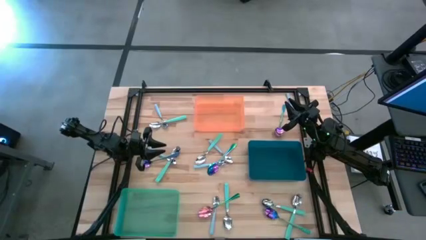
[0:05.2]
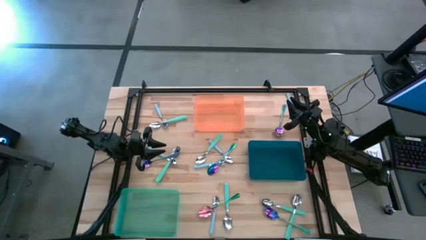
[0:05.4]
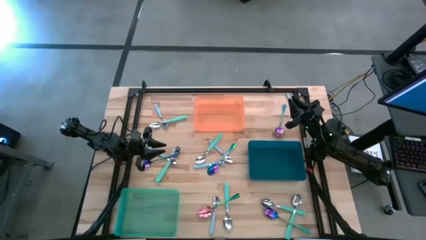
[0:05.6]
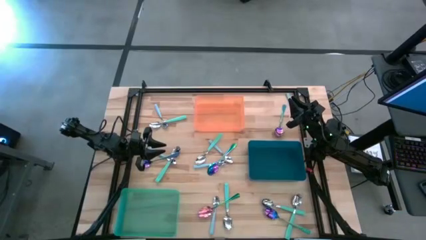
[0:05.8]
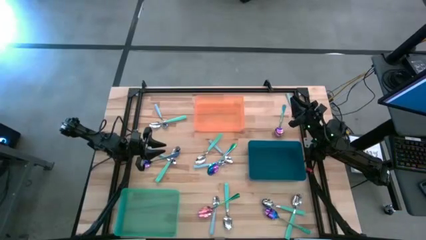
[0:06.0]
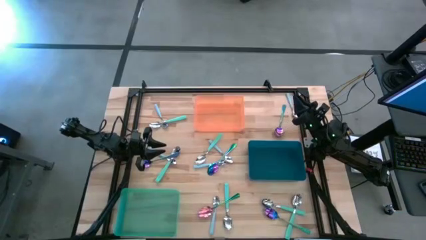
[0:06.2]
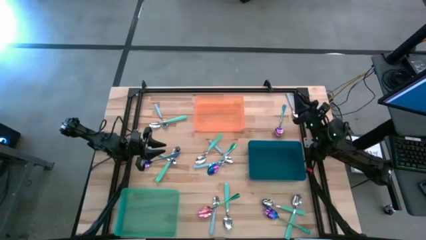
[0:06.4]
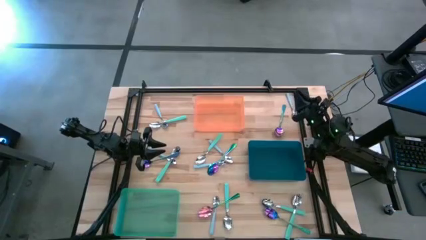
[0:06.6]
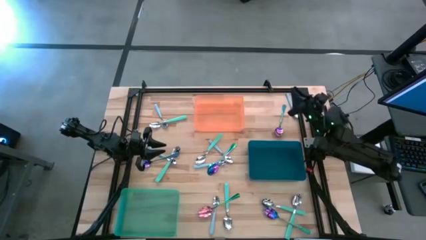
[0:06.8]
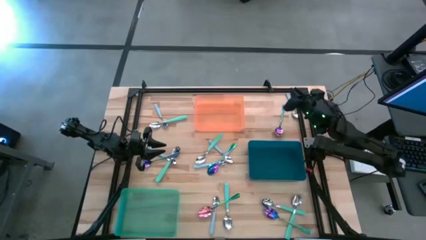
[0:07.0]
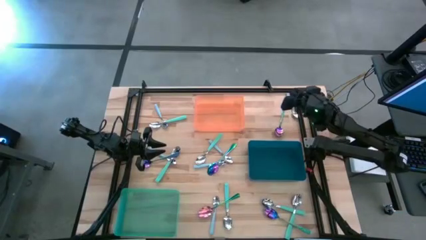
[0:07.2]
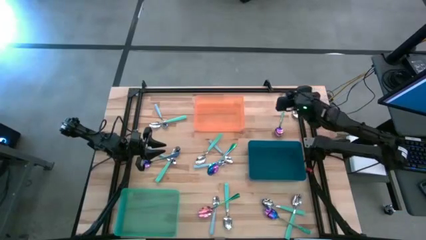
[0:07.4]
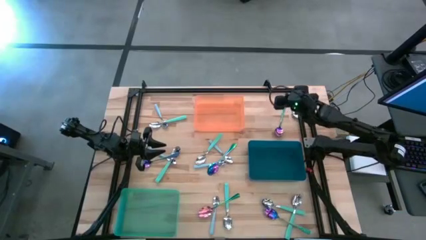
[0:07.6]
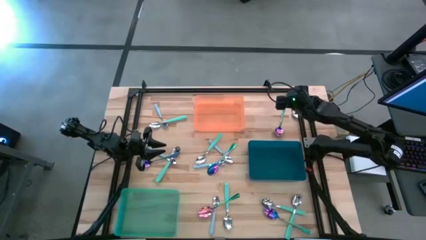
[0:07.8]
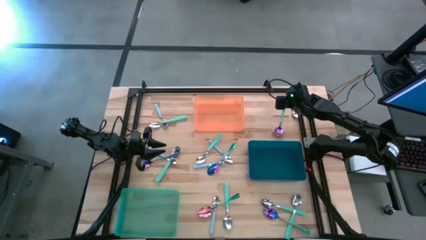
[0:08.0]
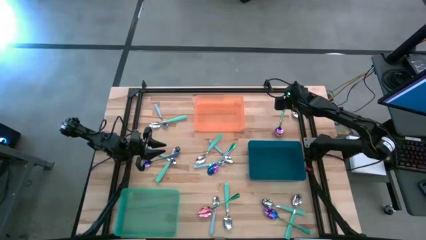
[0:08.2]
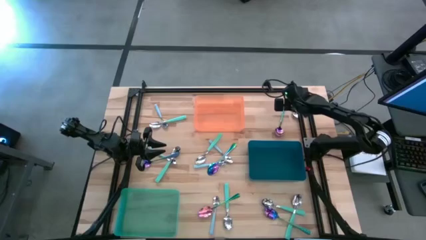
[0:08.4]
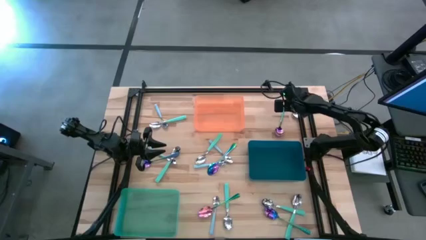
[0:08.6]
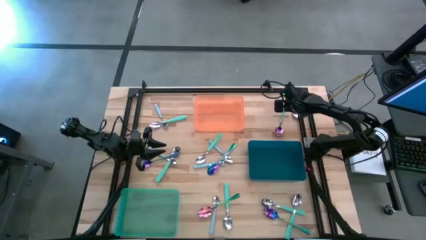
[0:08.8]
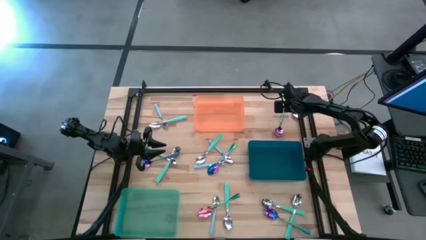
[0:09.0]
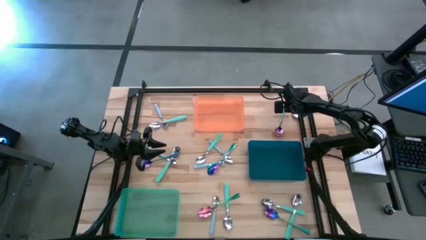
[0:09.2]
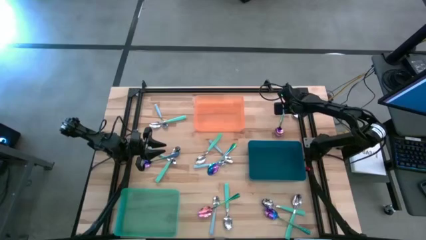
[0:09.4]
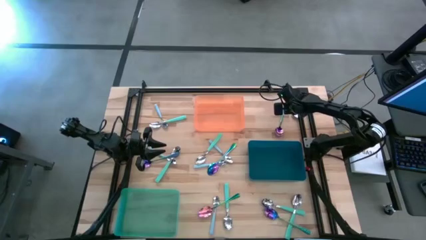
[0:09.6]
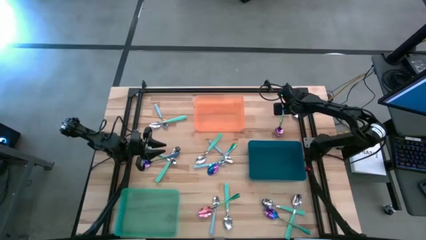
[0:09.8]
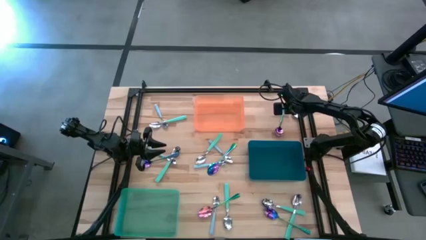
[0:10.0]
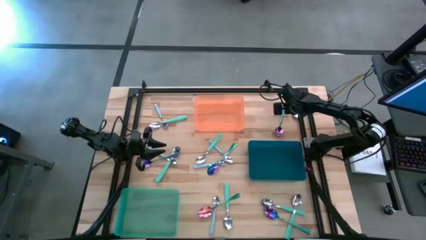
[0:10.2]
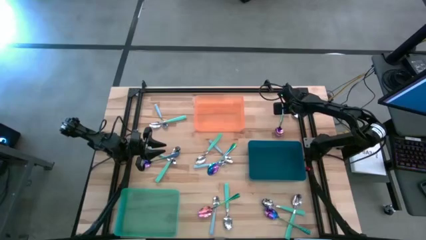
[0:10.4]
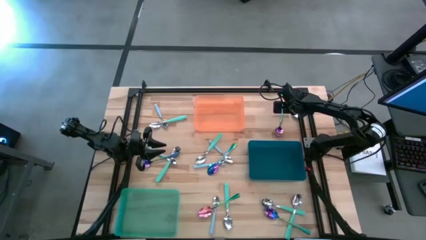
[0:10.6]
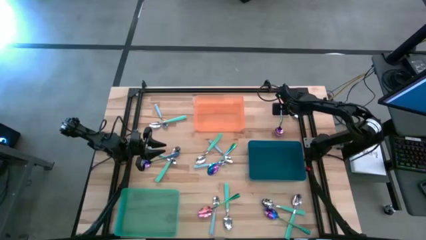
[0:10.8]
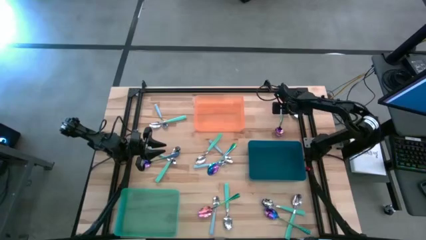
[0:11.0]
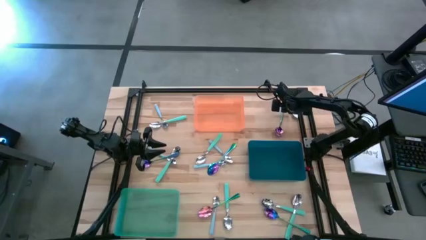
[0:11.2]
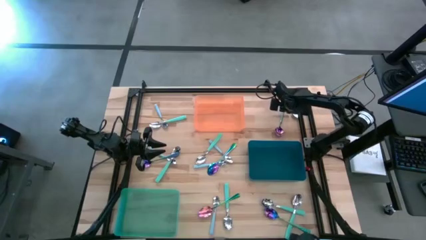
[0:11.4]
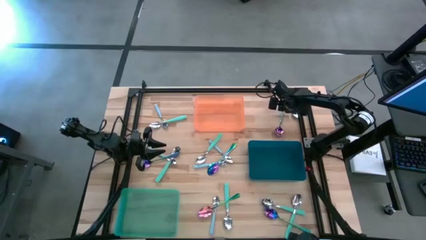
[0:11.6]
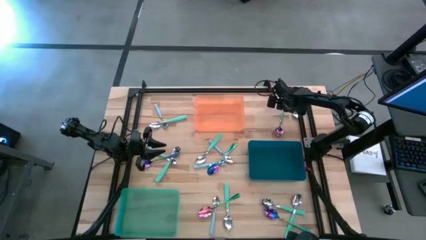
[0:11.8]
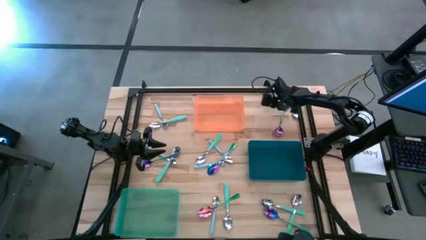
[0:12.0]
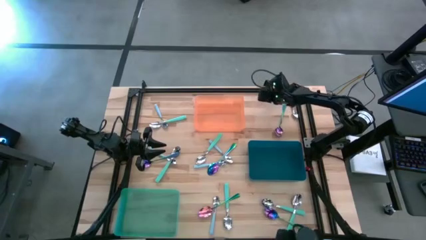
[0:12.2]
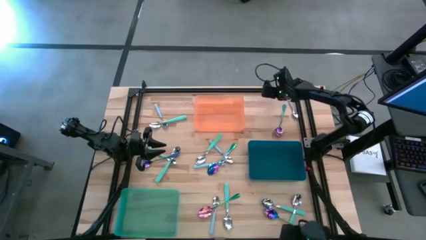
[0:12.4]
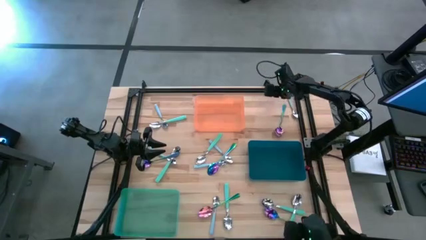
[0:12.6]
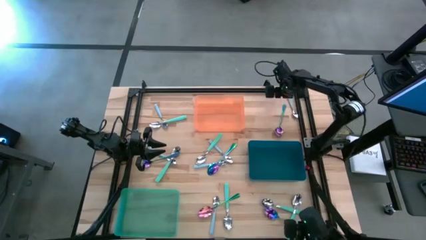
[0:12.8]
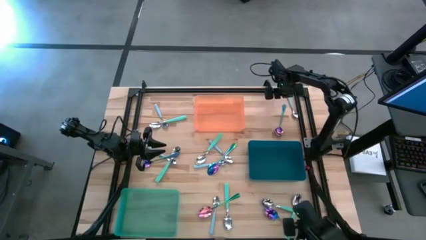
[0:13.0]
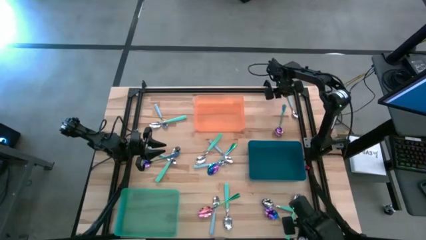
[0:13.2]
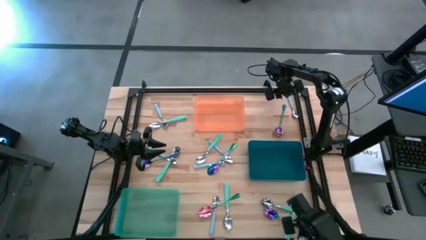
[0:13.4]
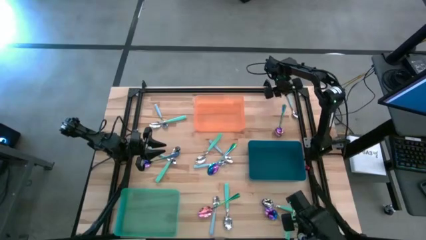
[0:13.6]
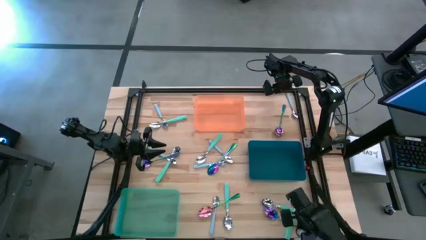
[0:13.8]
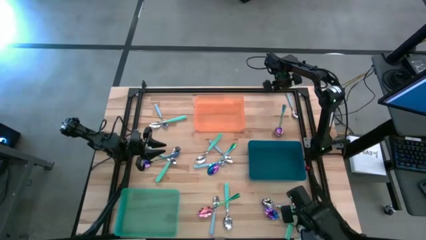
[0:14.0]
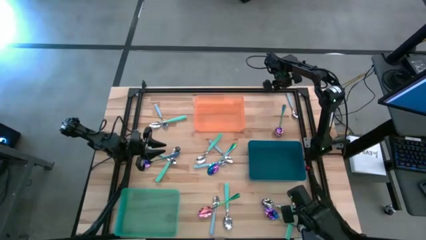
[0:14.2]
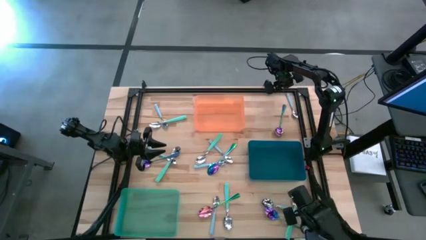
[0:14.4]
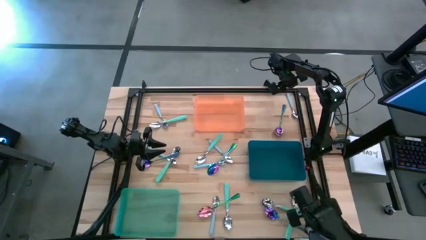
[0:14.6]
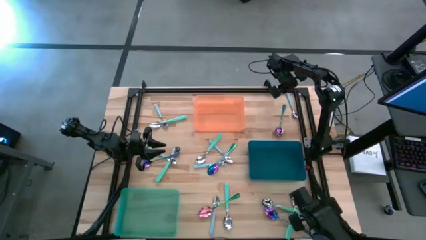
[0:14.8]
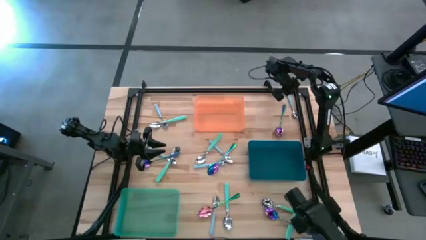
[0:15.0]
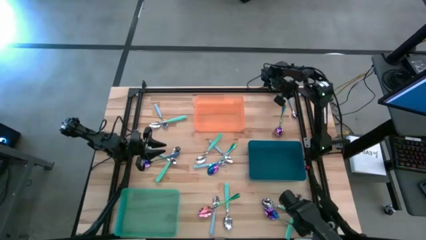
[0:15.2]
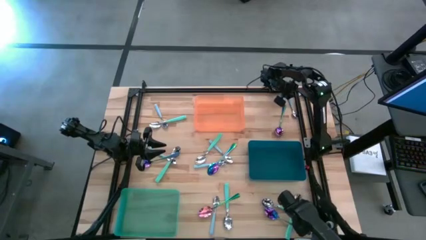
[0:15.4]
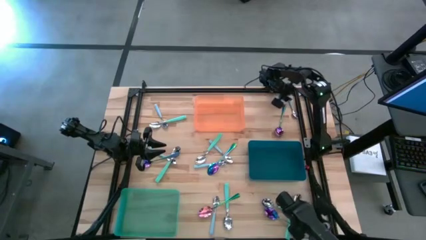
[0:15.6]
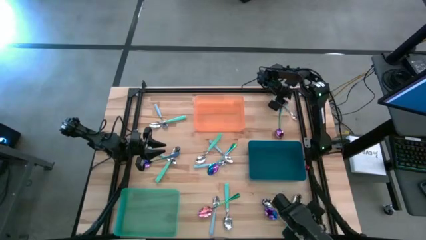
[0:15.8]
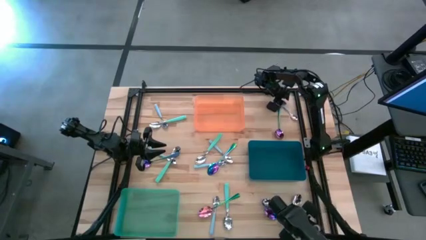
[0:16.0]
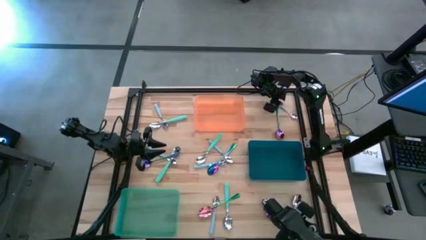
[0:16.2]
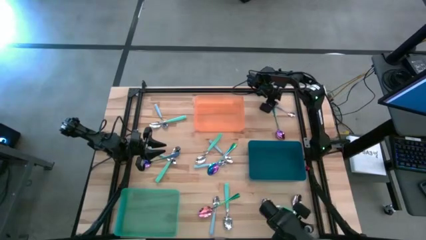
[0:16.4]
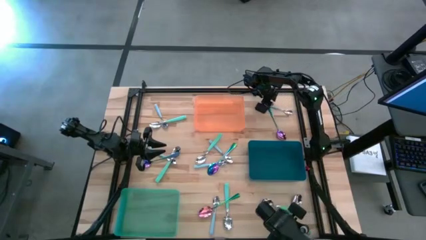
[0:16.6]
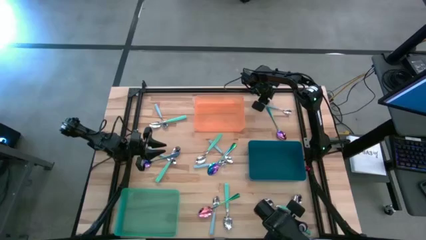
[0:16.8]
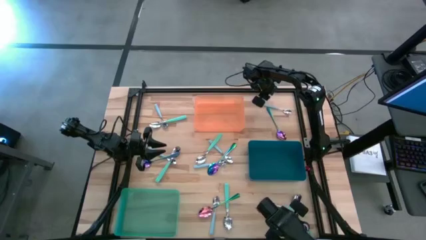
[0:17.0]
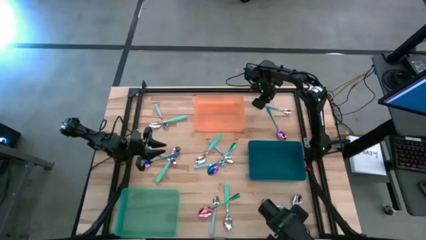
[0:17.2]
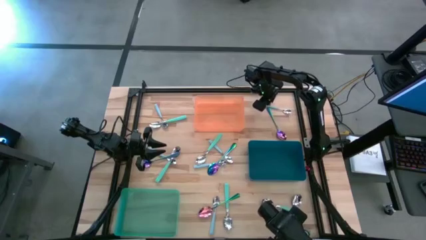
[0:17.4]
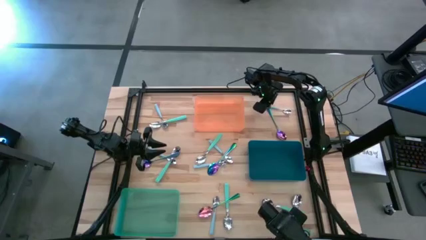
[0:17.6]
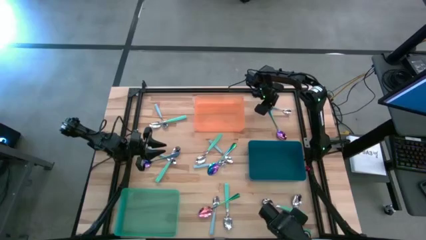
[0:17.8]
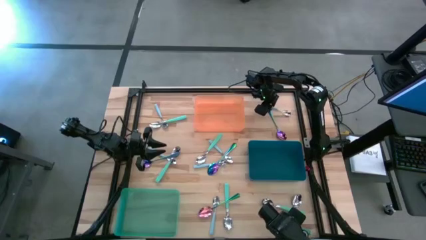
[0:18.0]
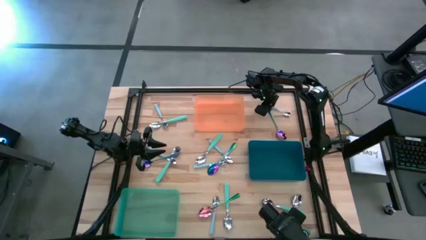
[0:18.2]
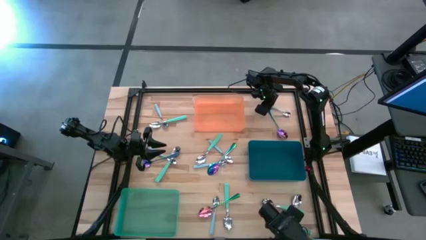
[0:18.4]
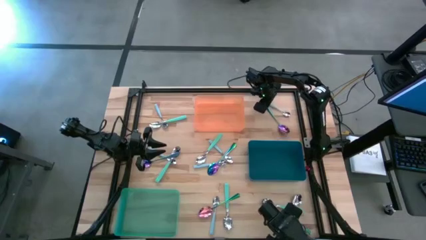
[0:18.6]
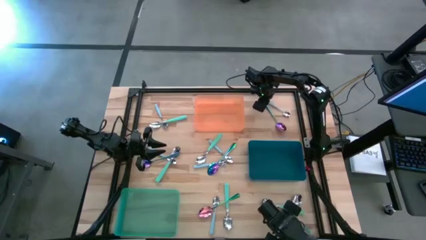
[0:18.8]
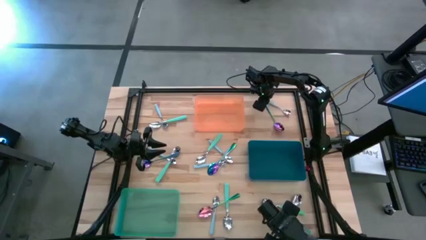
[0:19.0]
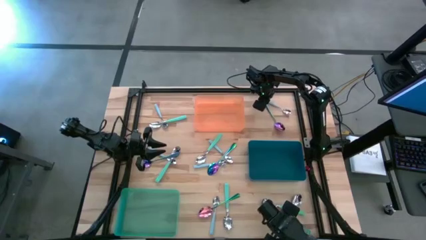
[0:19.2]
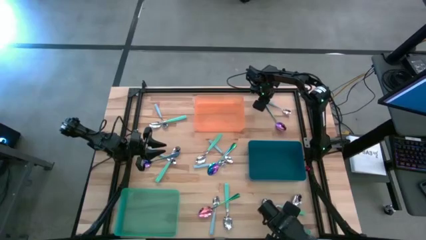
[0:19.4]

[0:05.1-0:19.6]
Task: Sort silverware by color (type)
Put the blue spoon into the orange bin

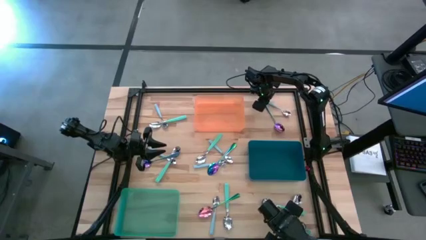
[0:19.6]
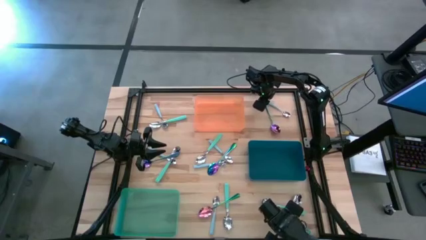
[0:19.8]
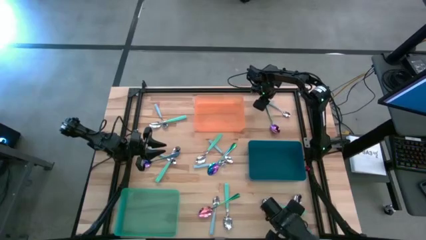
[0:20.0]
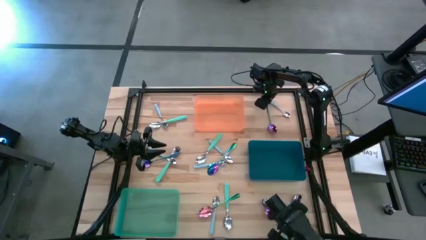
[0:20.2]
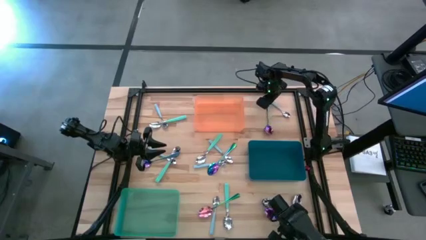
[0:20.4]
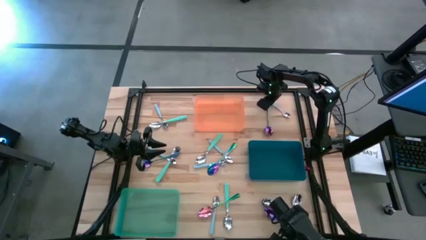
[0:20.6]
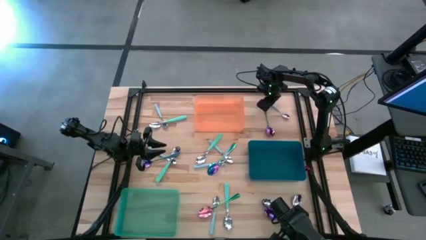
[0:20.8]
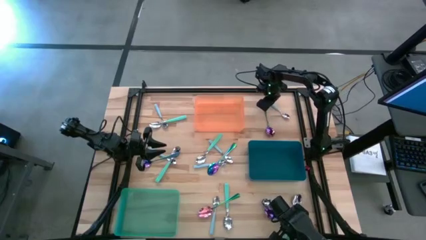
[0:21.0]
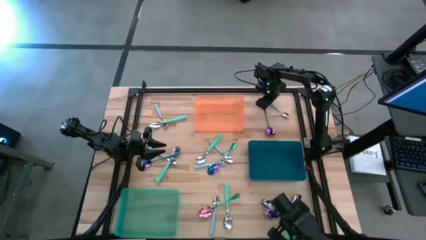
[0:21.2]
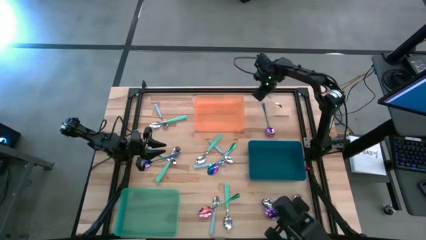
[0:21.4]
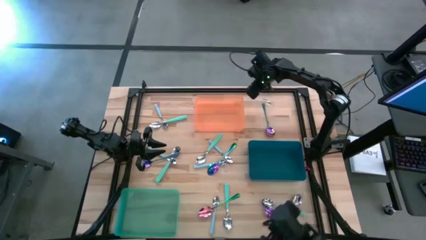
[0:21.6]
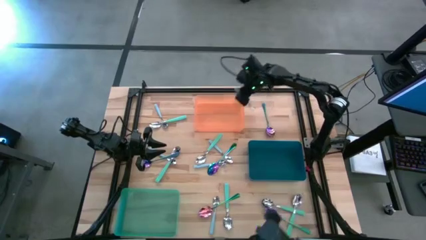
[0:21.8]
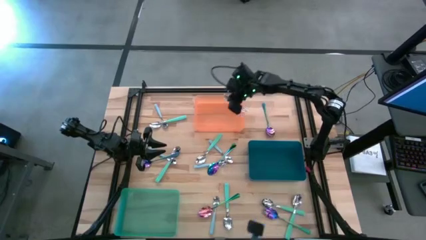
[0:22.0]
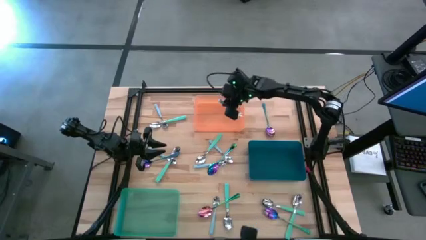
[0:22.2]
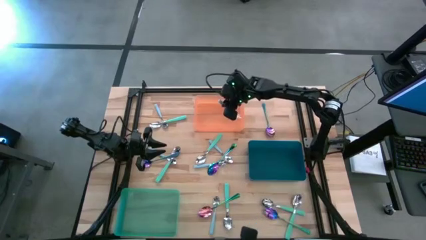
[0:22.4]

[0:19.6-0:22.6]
Put the blue spoon into the orange bin
